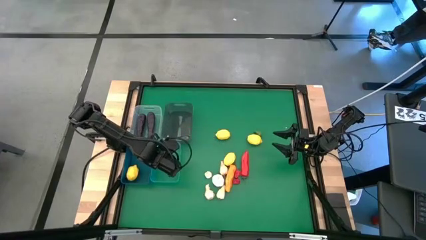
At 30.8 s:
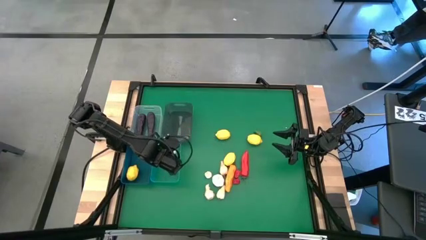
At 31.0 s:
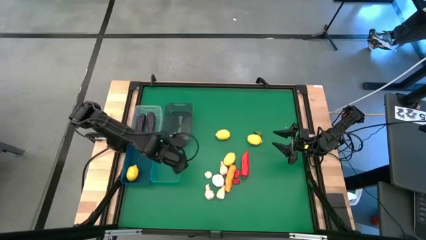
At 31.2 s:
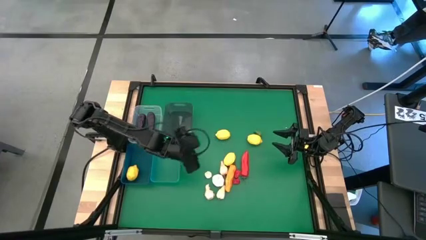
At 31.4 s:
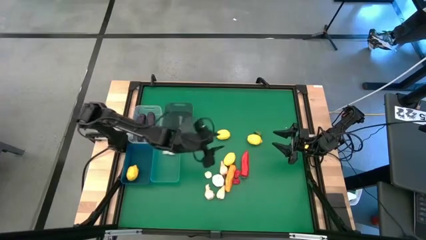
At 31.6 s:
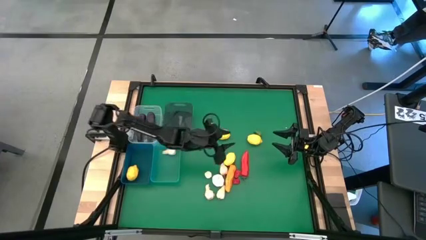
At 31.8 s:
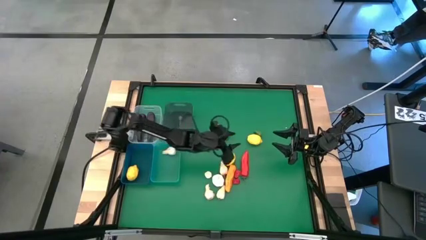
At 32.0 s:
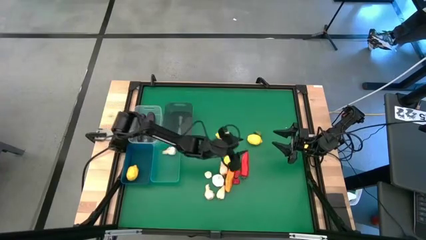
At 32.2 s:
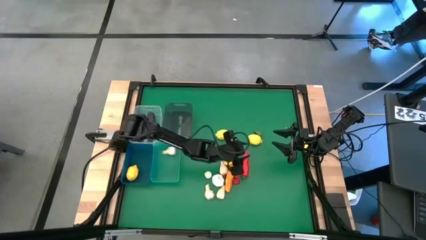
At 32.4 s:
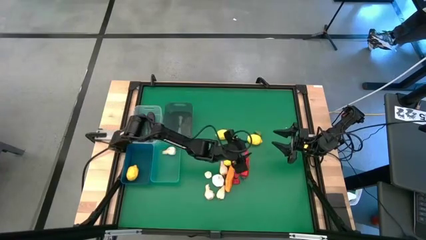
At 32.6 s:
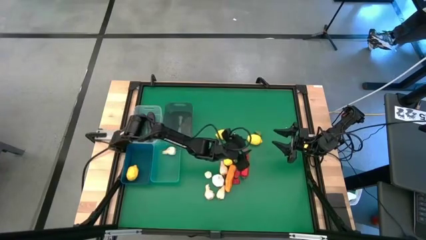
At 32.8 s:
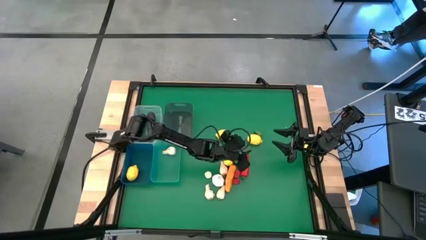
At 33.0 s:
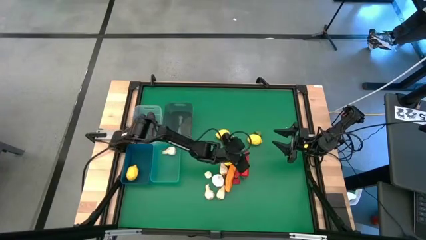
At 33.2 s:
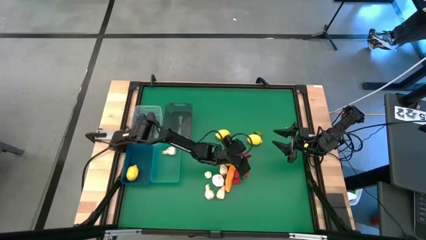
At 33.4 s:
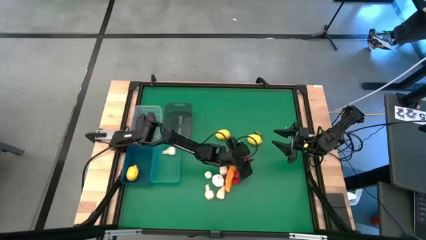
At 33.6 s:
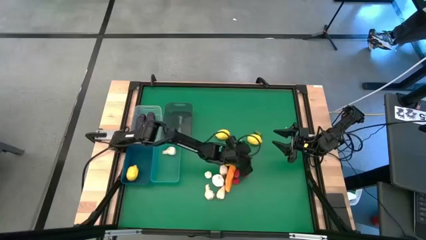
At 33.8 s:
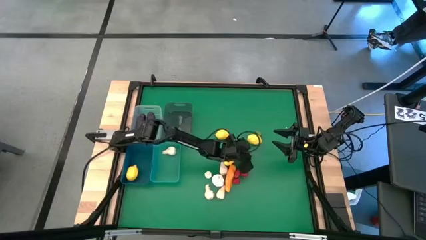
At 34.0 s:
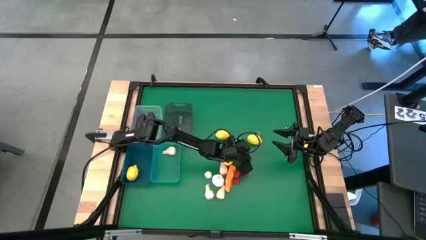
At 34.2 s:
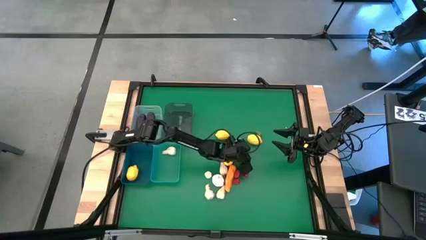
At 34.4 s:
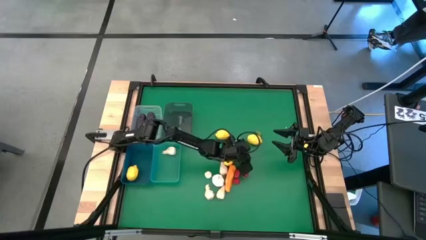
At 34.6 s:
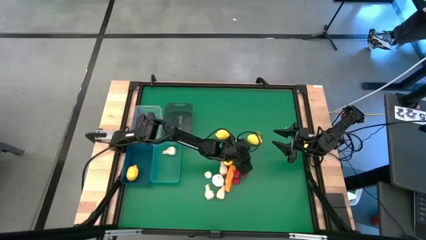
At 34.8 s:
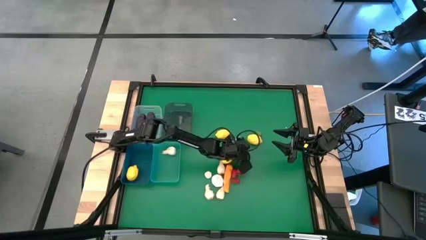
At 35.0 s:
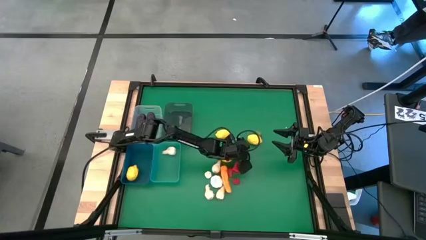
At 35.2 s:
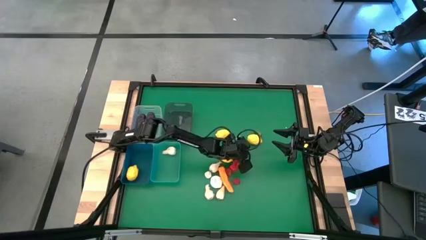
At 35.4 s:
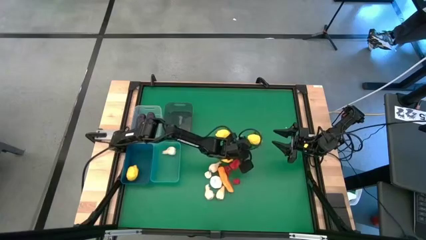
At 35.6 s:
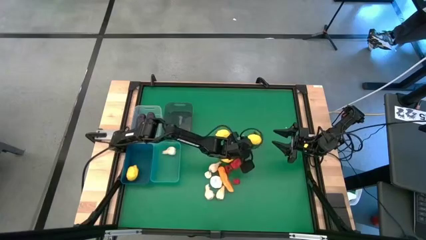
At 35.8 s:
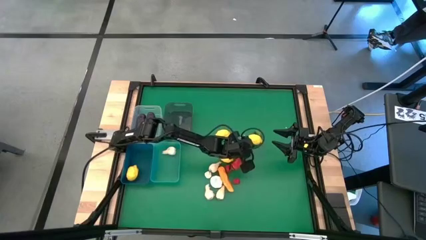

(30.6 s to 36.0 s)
Task: Sort produce into baskets
Put the red chili pepper into the black bin

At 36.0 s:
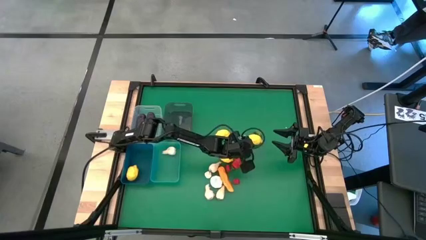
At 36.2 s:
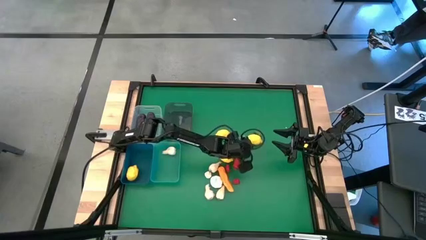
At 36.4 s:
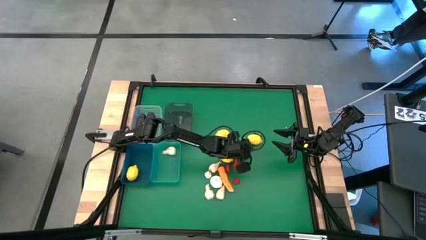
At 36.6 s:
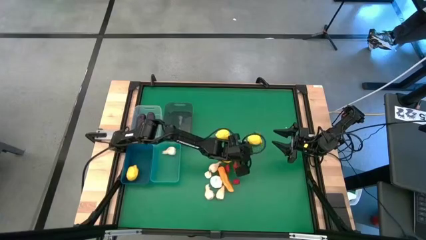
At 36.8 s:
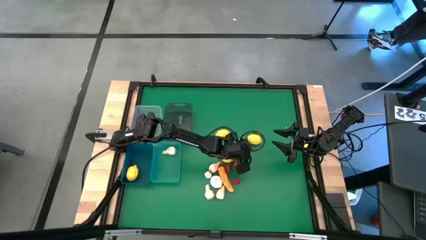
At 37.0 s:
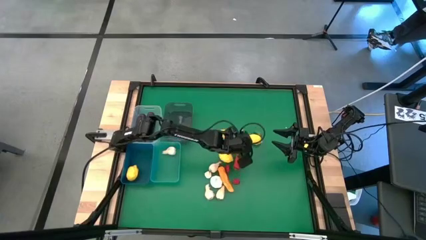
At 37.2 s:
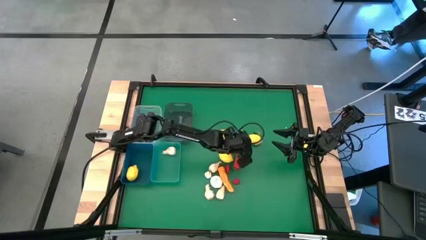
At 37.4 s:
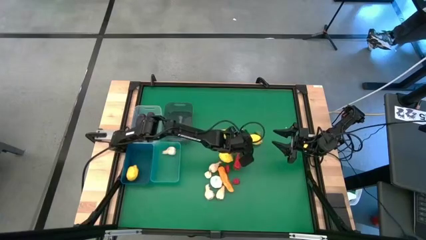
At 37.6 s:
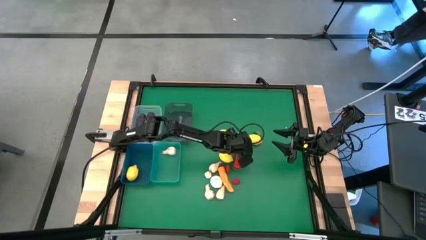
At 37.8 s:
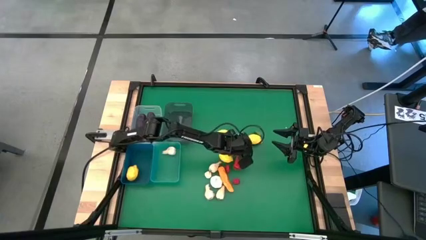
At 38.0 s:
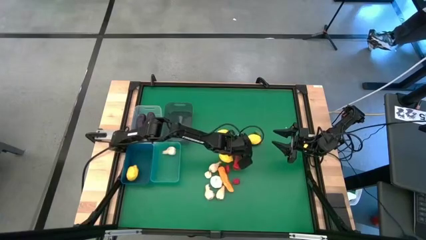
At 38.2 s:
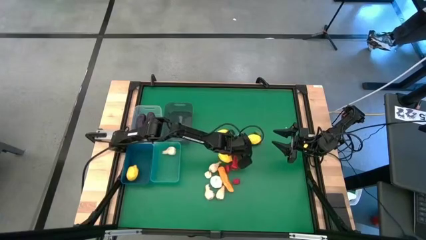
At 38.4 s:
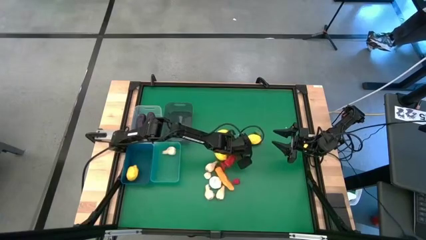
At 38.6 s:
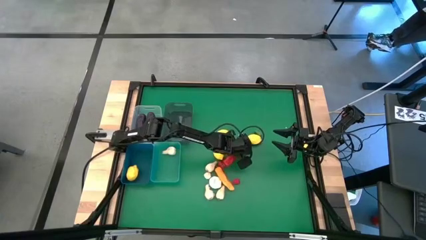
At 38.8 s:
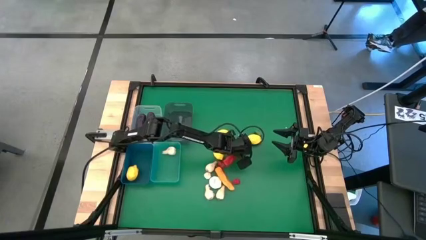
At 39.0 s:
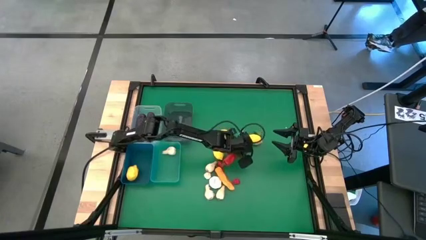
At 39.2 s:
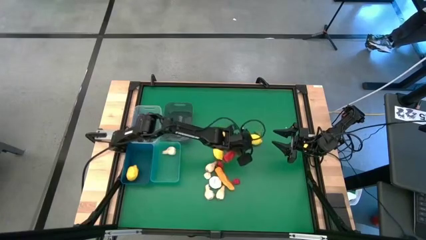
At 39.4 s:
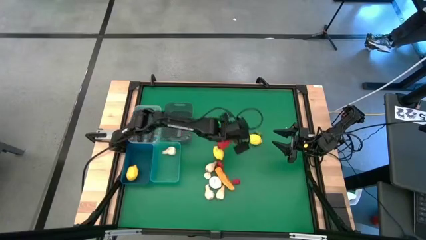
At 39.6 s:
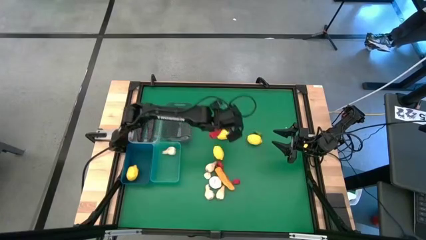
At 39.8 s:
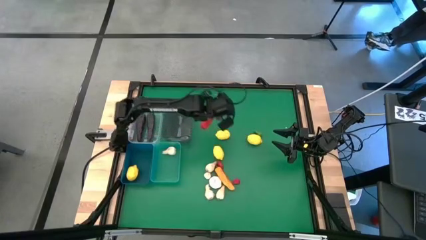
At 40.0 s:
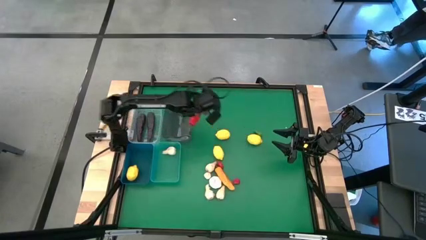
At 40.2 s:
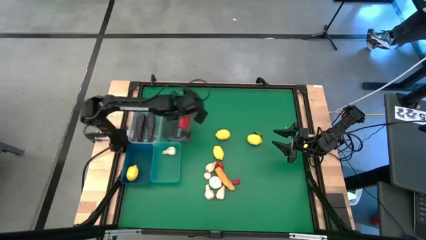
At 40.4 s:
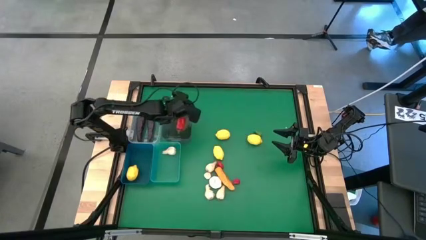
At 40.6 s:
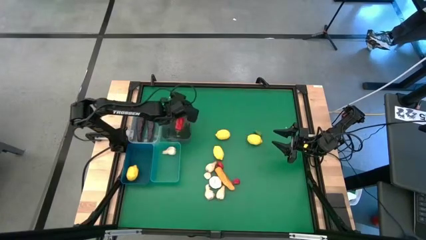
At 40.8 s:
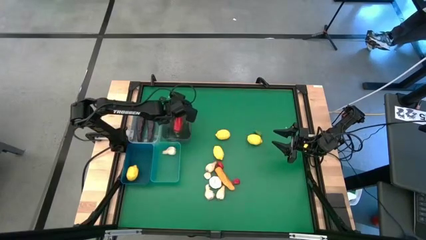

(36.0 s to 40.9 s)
Put the red chili pepper into the black bin

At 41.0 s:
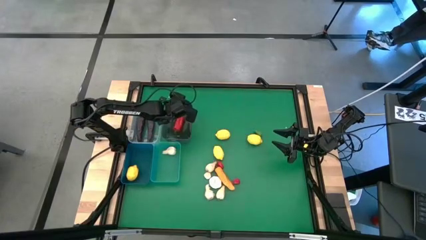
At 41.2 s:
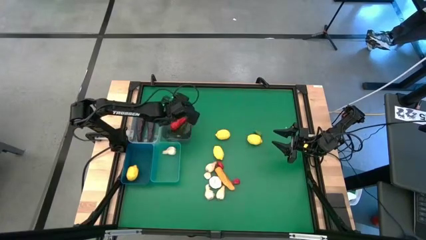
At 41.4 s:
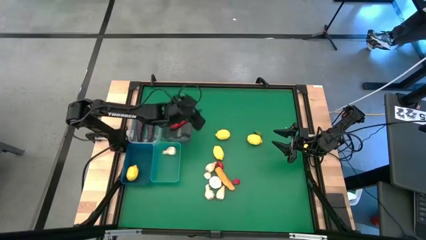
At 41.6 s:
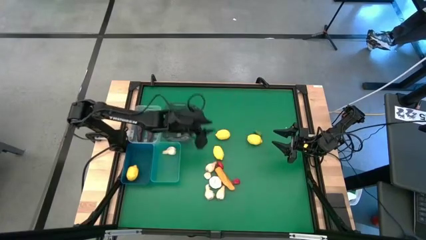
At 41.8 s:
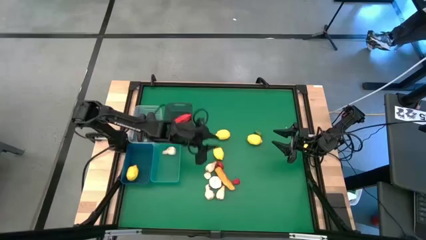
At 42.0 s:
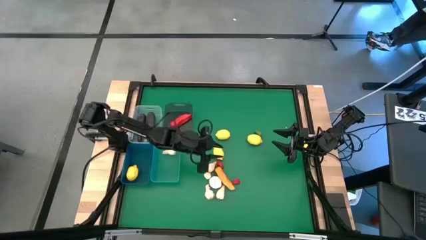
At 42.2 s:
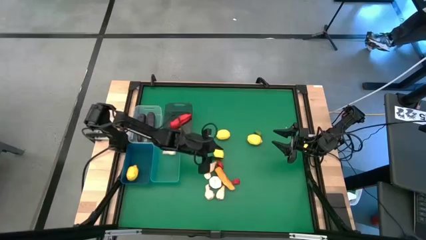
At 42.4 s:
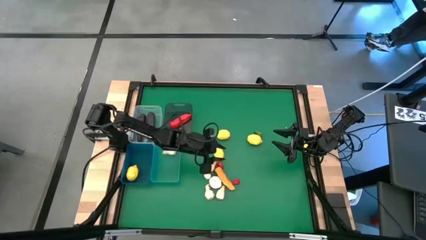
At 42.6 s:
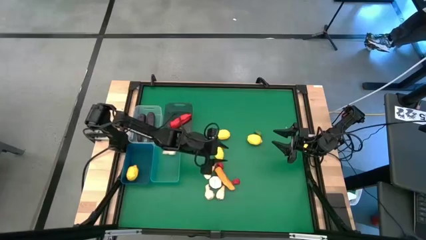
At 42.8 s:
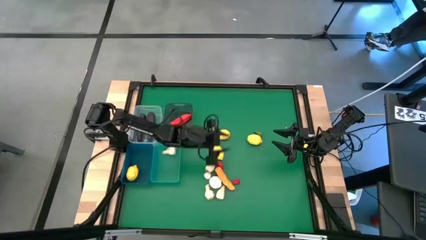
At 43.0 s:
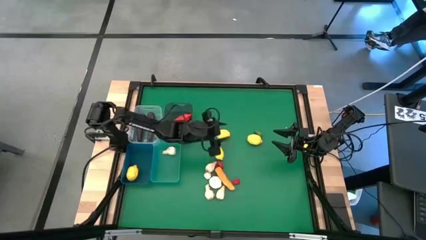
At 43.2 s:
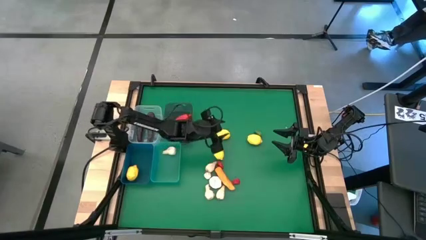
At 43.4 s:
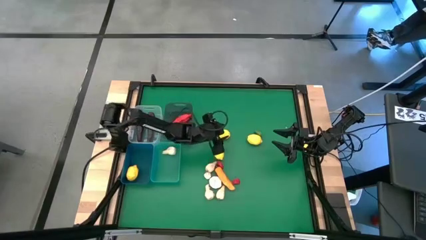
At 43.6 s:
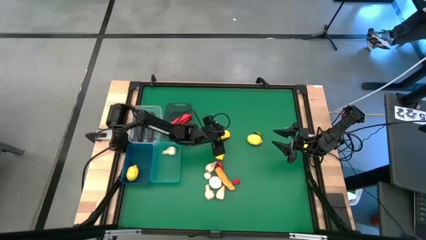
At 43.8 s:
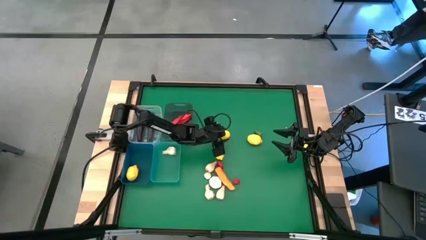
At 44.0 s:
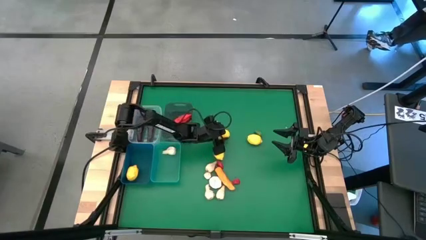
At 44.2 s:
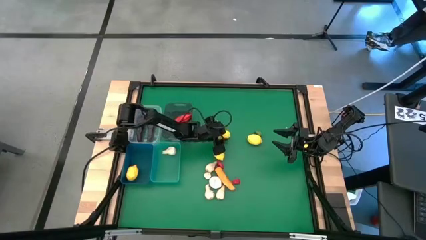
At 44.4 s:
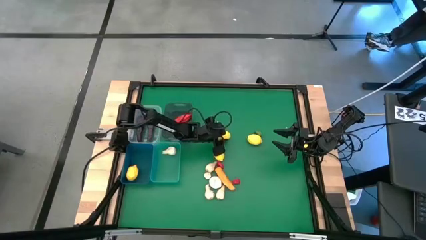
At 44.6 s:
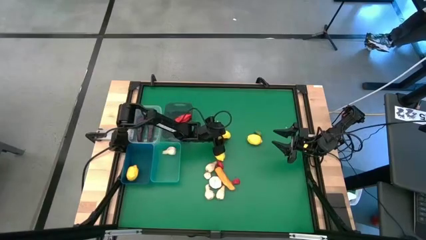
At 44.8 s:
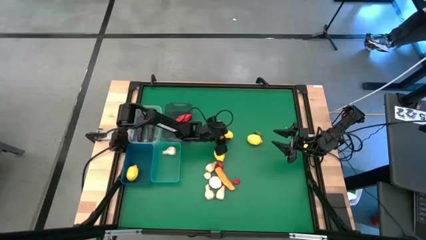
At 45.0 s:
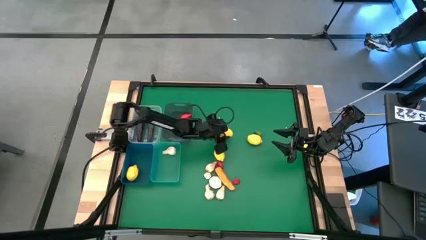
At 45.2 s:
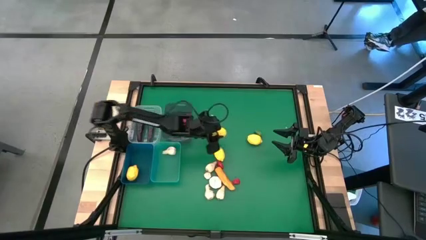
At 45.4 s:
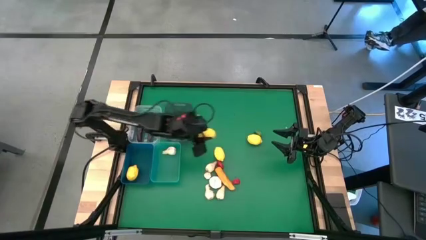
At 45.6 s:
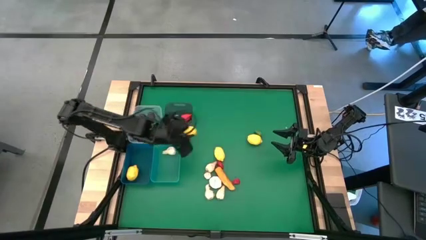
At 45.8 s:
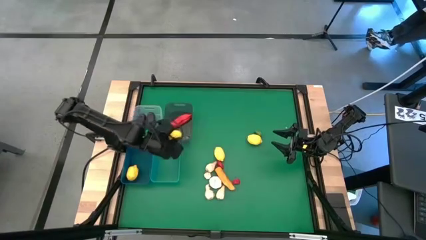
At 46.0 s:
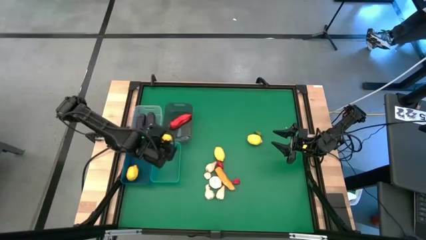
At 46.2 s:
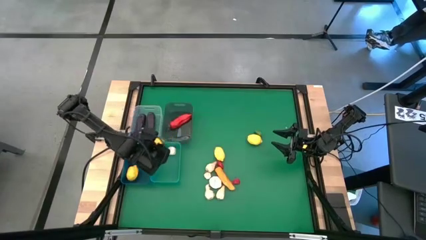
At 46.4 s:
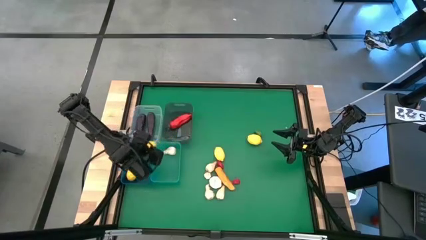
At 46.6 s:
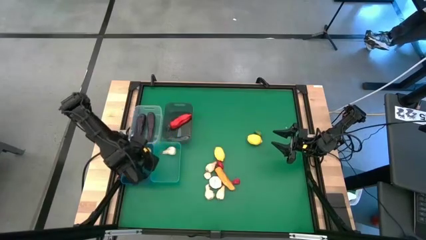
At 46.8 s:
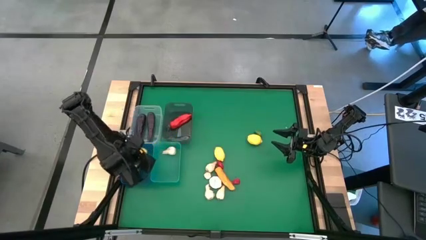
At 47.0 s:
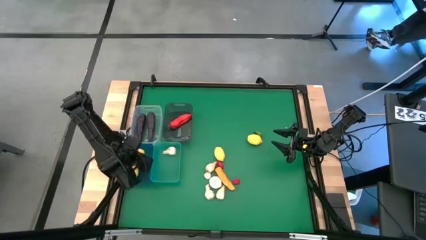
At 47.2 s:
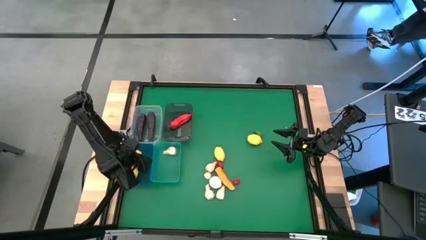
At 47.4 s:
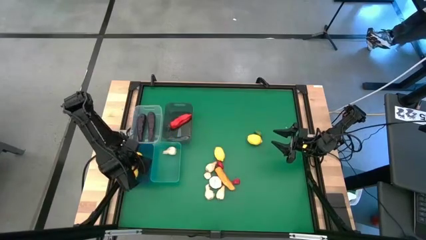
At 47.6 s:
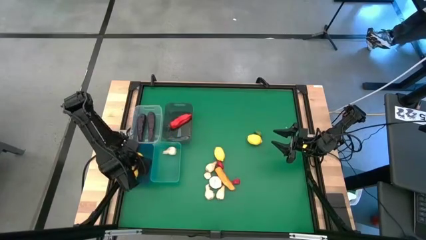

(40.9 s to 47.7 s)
Put the yellow lemon into the blue bin
